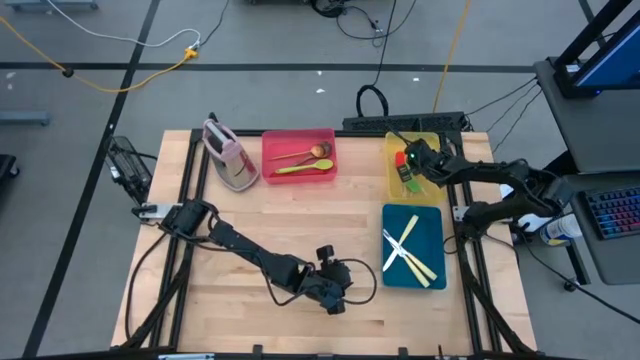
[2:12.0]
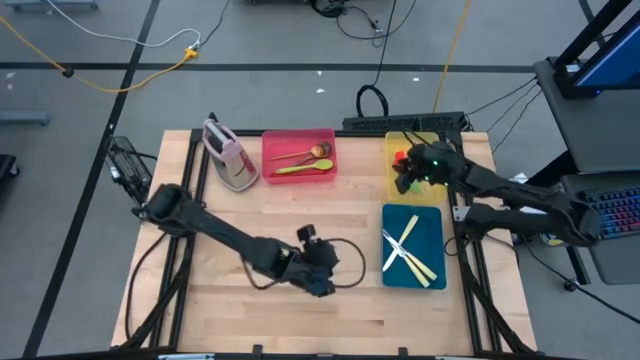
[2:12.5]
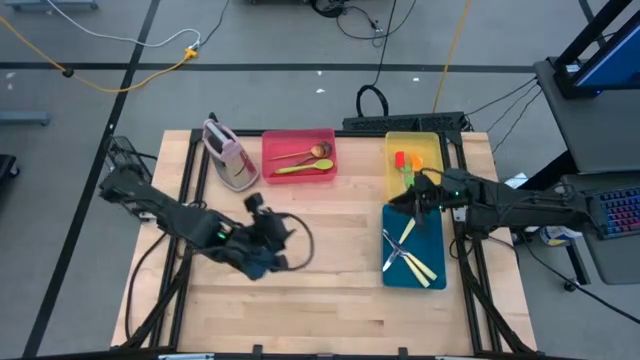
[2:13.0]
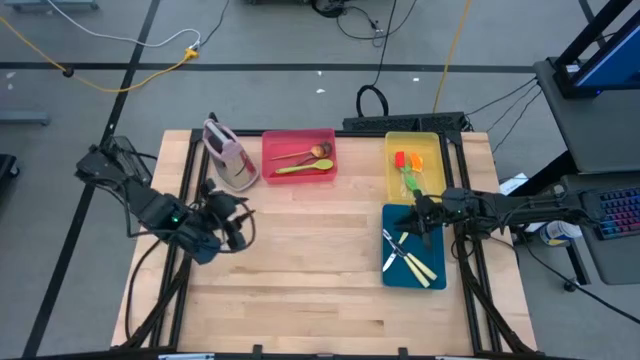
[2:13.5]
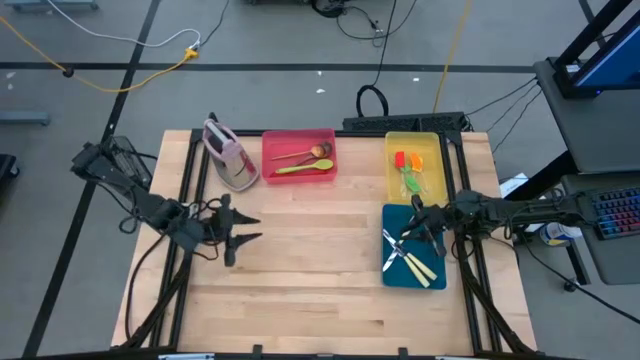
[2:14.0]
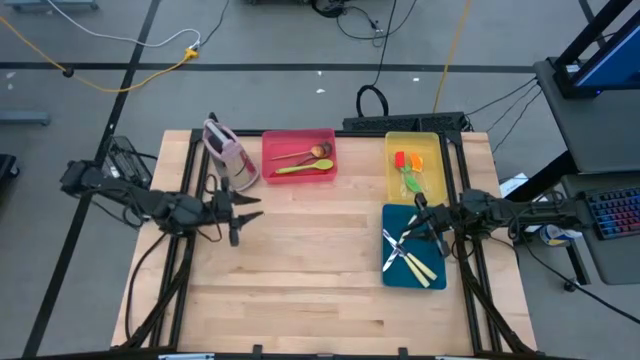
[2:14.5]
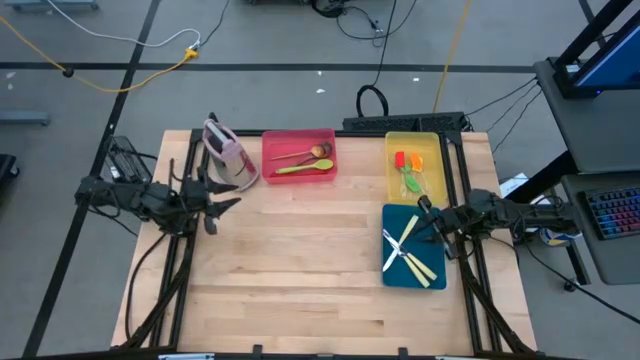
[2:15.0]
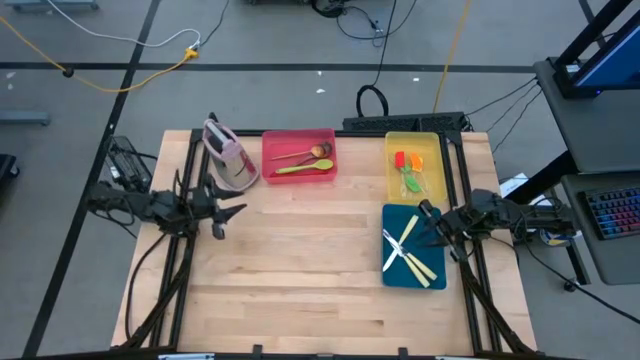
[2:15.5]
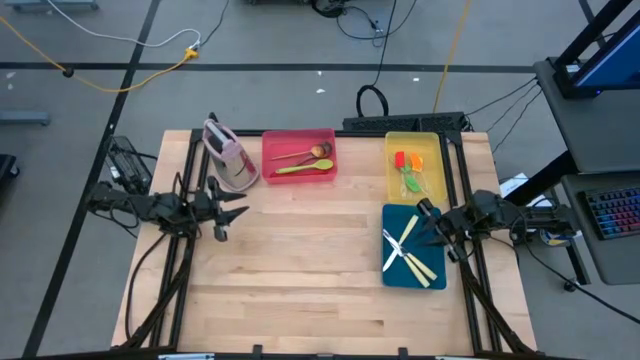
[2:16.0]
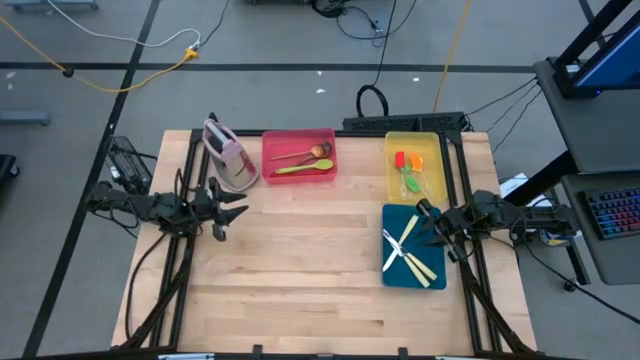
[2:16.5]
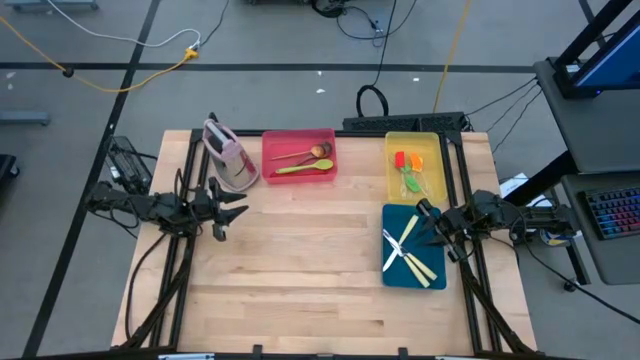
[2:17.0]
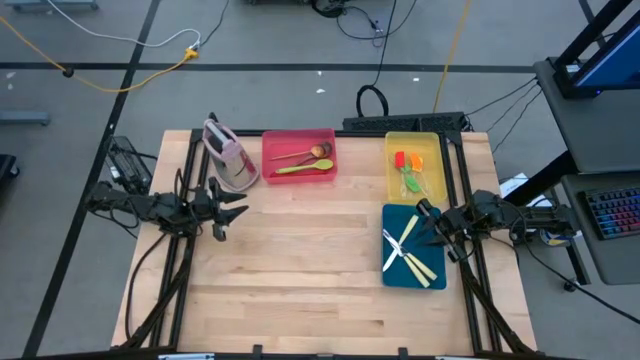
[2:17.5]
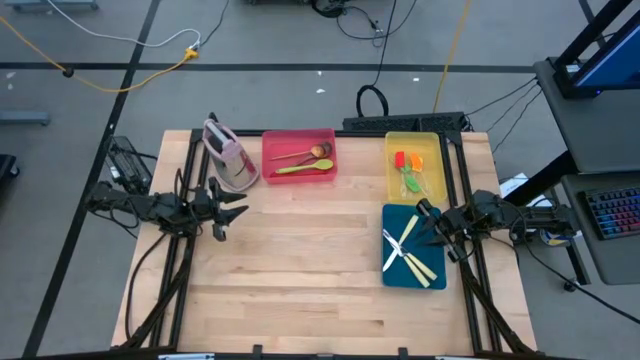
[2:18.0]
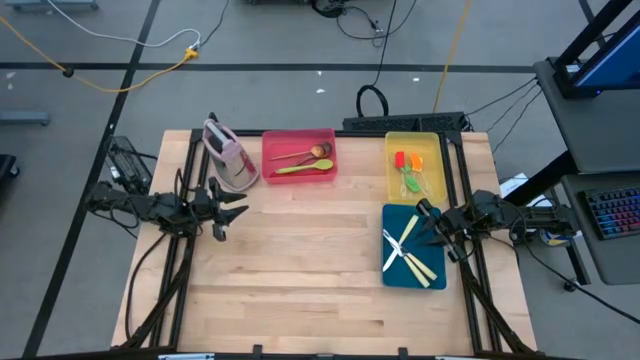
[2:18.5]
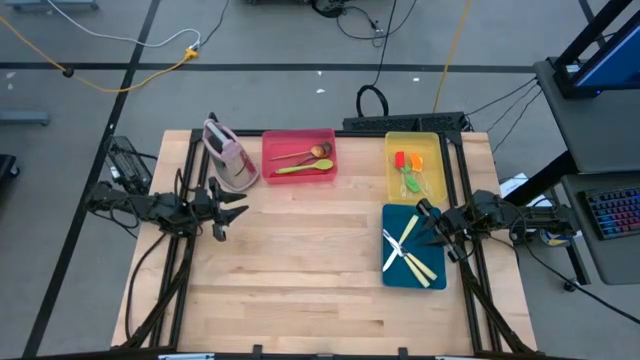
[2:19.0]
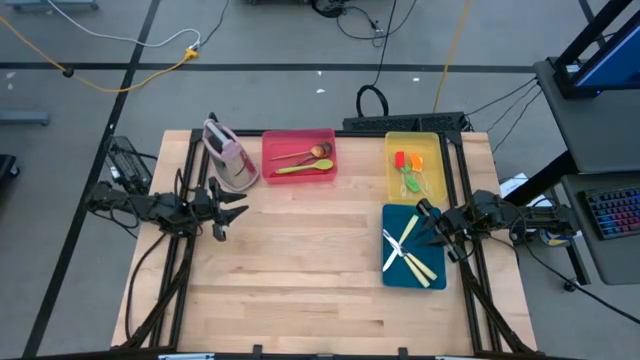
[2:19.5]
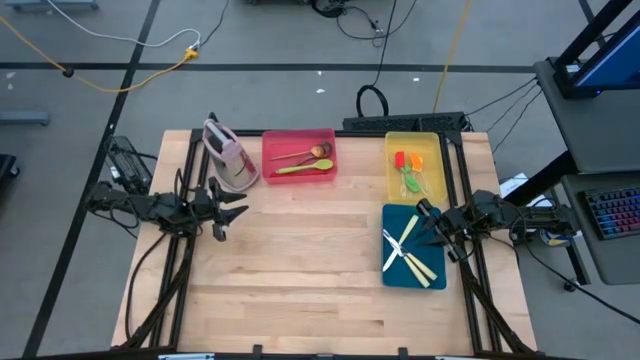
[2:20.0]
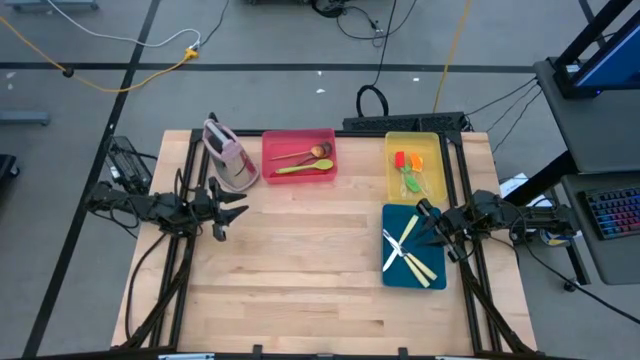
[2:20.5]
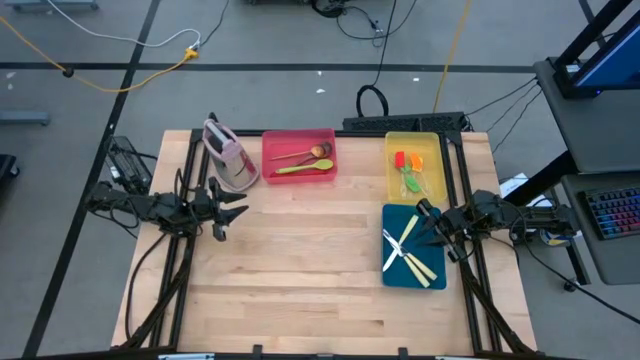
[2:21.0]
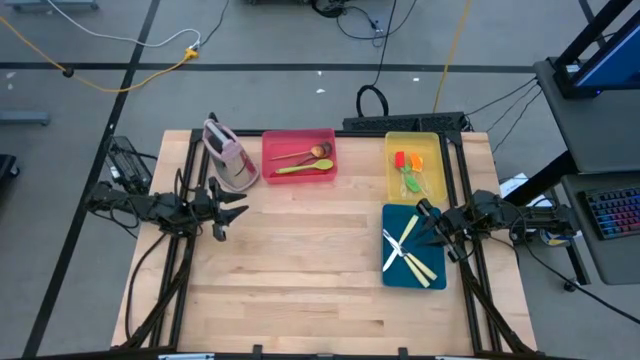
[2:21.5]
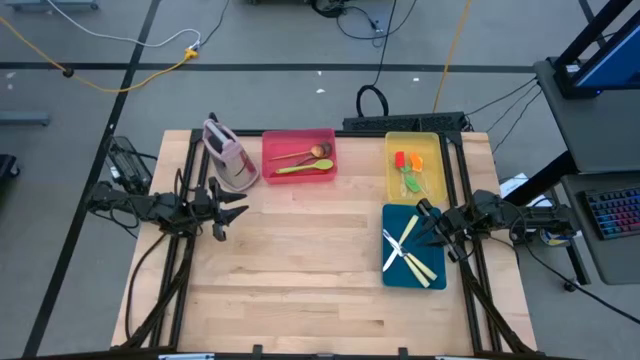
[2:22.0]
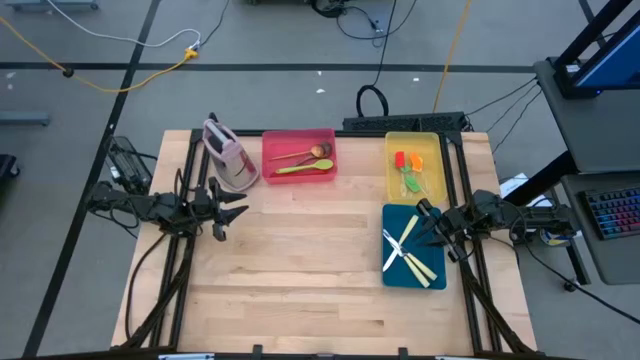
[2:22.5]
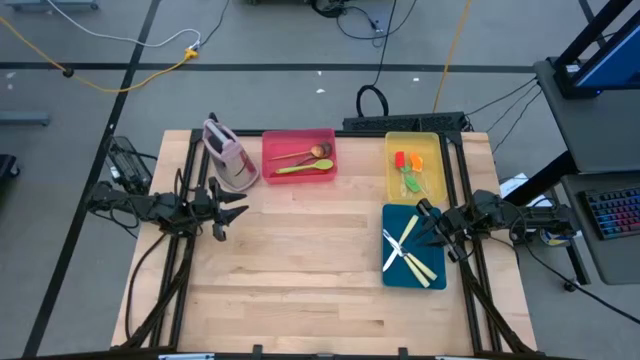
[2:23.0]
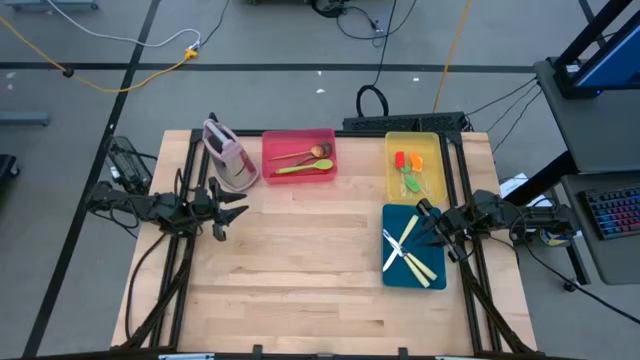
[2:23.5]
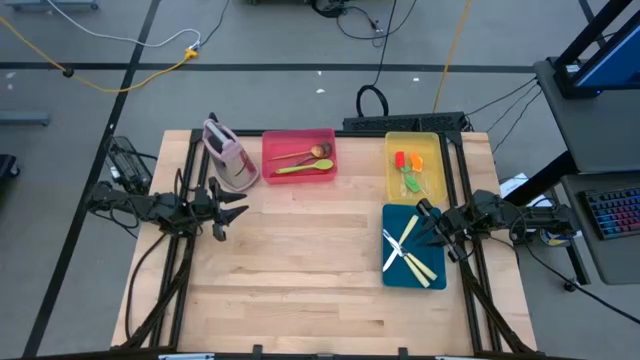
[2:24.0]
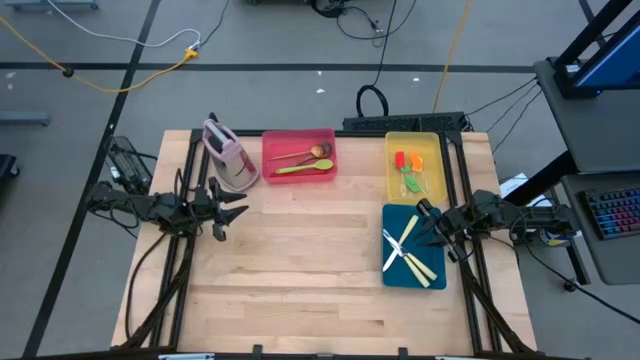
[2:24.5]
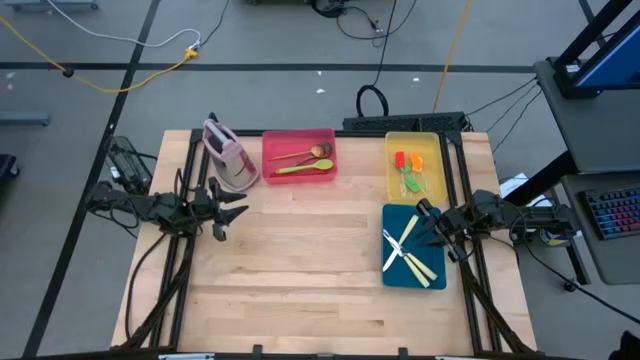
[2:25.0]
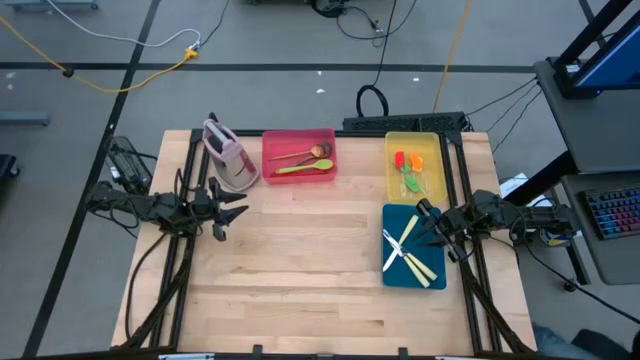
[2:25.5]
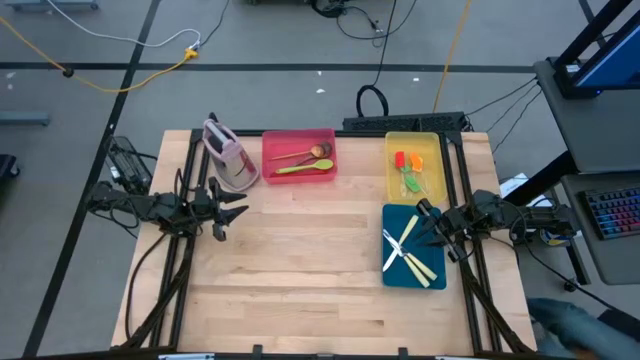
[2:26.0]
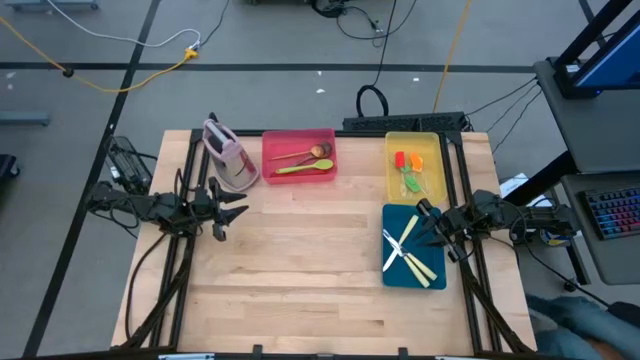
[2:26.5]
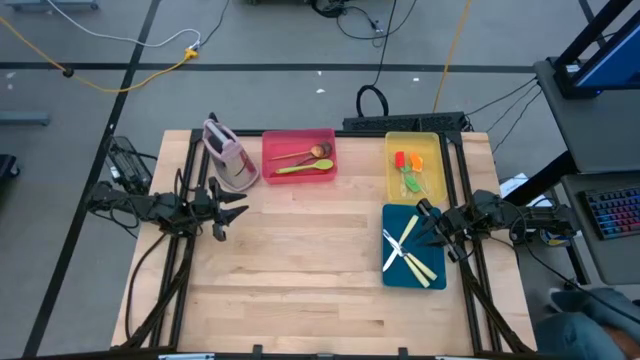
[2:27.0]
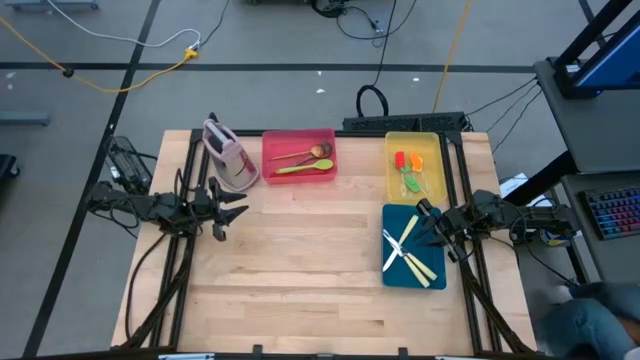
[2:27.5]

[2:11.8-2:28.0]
Task: Pick & Place Kitchen Items
Return to Home Position

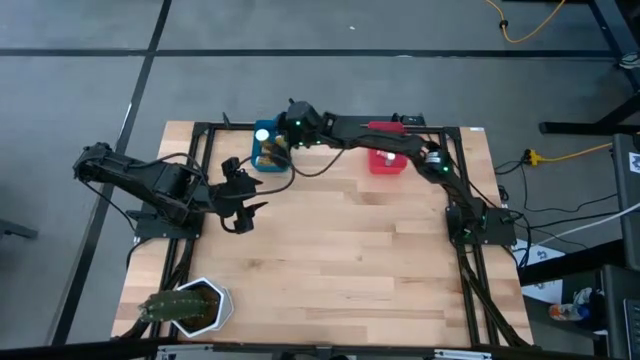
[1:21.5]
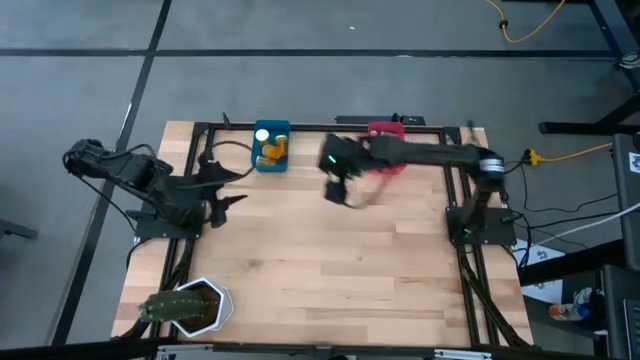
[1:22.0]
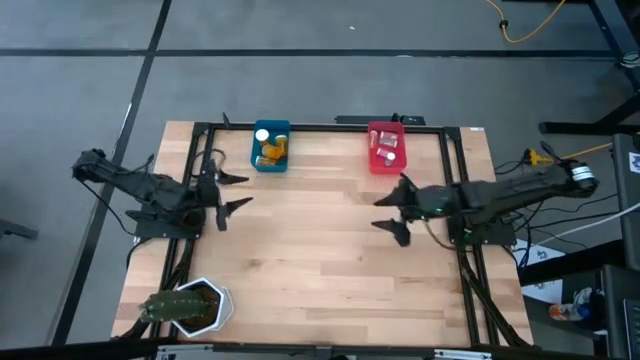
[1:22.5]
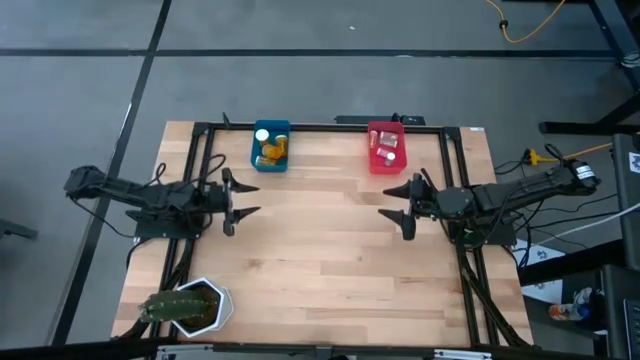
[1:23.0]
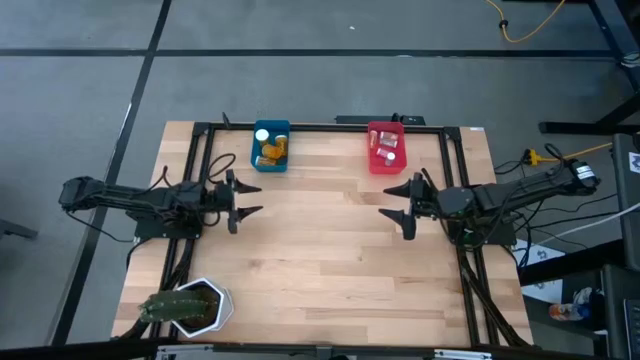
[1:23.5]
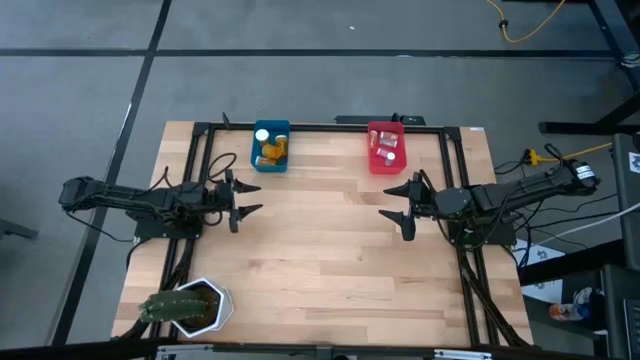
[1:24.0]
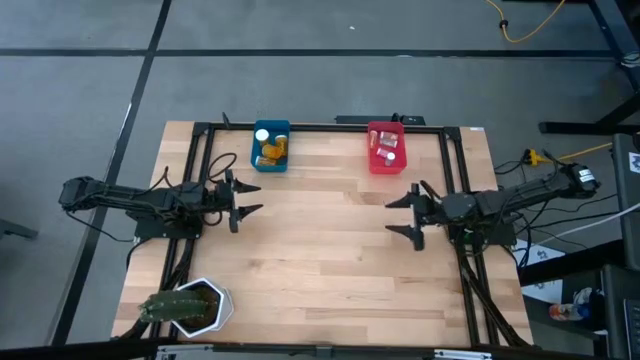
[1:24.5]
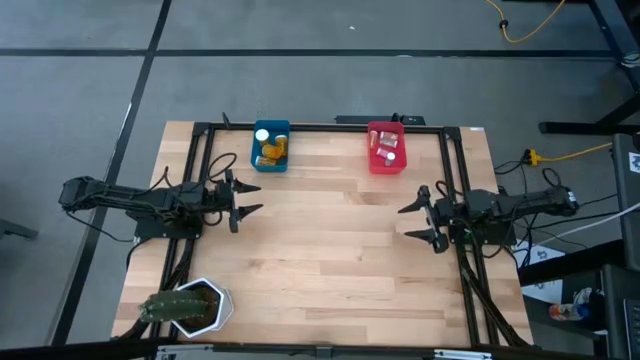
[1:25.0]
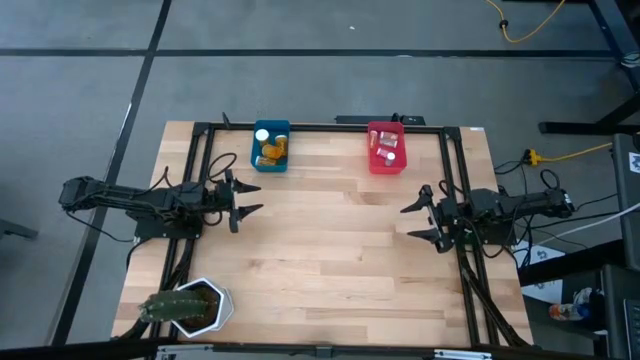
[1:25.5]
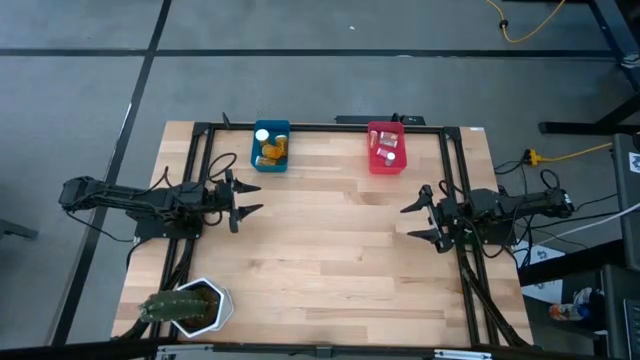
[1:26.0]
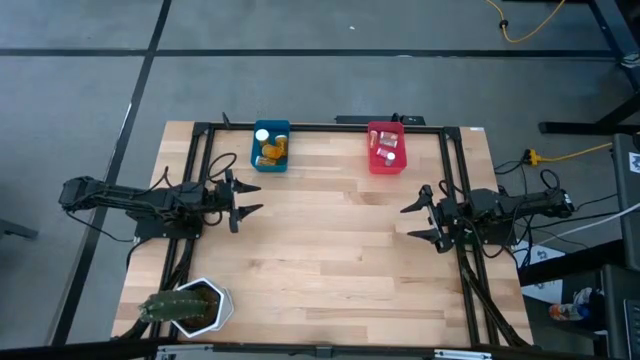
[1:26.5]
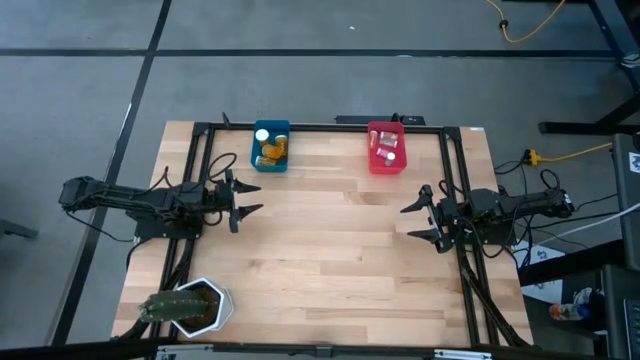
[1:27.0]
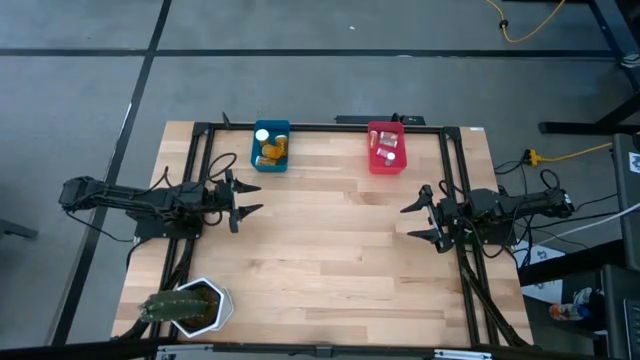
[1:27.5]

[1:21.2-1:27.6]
Task: Pick and place medicine bottles into bin by pill shape (circle, oval)
Return to Home Position
